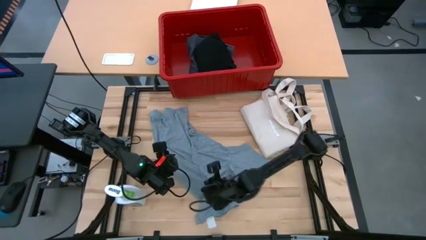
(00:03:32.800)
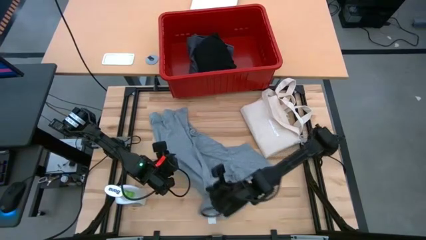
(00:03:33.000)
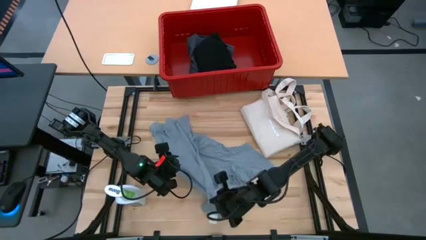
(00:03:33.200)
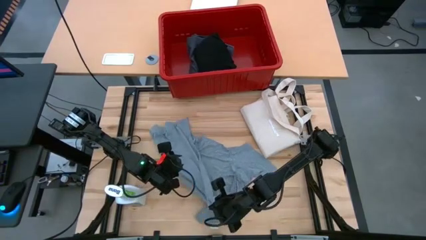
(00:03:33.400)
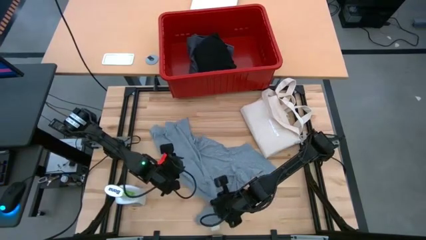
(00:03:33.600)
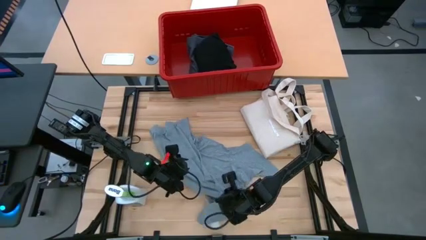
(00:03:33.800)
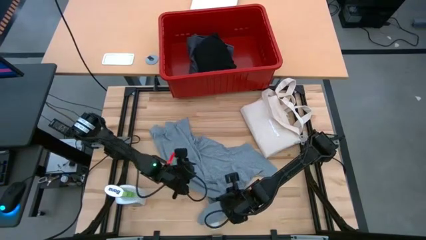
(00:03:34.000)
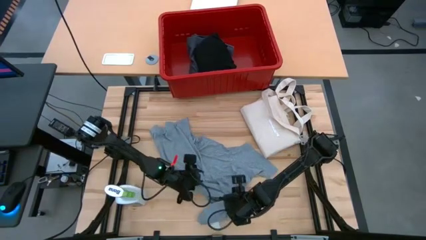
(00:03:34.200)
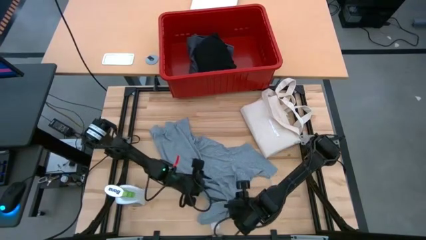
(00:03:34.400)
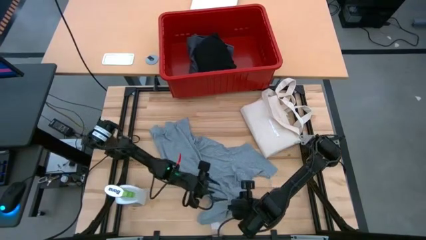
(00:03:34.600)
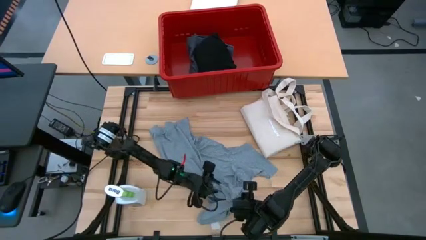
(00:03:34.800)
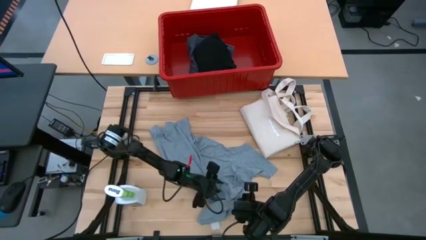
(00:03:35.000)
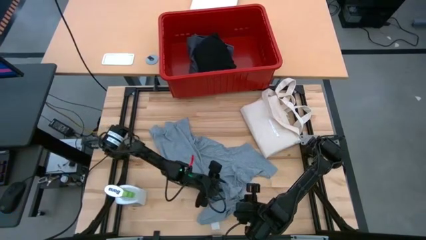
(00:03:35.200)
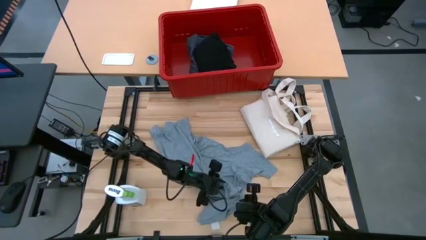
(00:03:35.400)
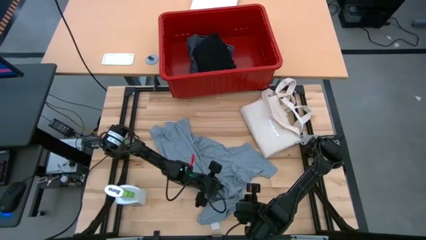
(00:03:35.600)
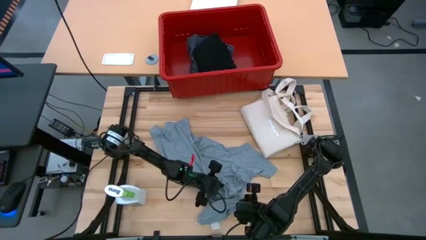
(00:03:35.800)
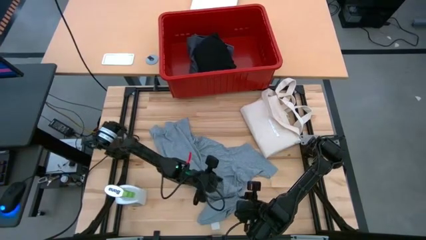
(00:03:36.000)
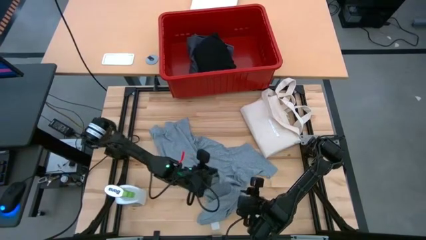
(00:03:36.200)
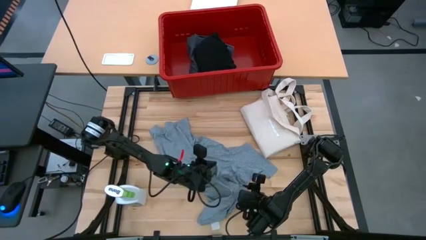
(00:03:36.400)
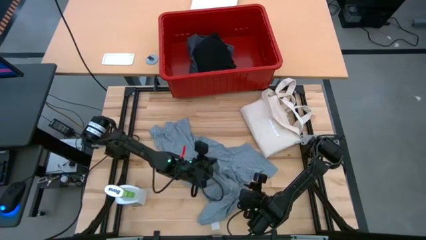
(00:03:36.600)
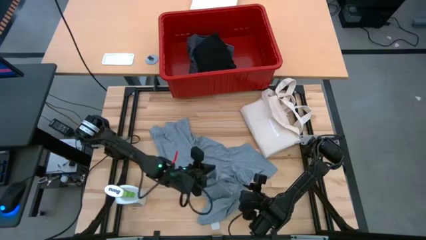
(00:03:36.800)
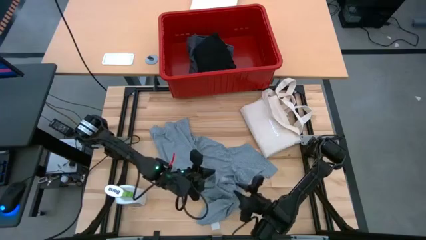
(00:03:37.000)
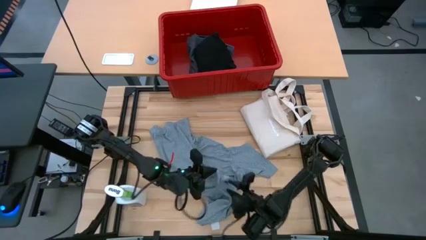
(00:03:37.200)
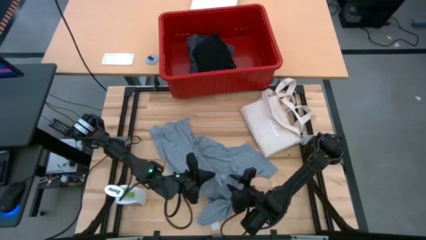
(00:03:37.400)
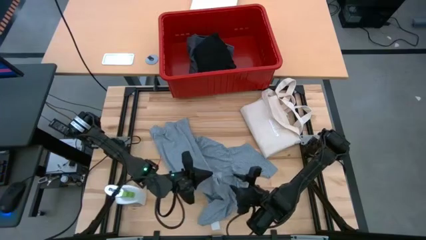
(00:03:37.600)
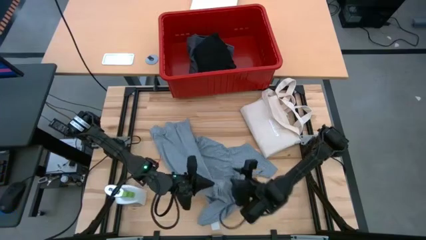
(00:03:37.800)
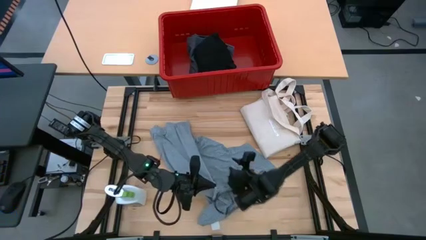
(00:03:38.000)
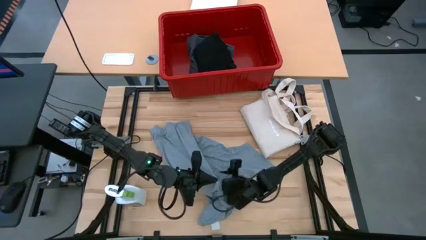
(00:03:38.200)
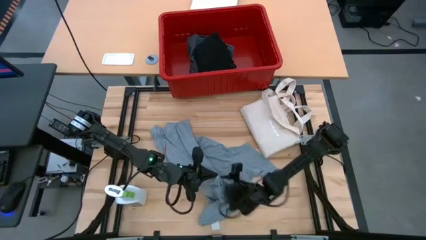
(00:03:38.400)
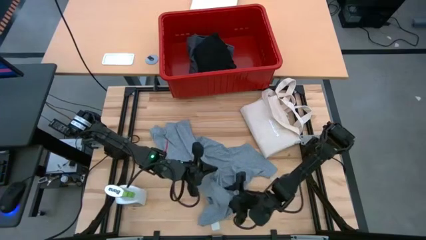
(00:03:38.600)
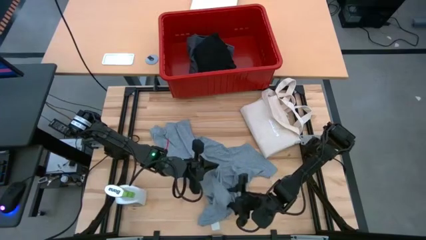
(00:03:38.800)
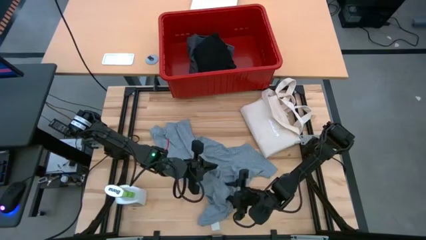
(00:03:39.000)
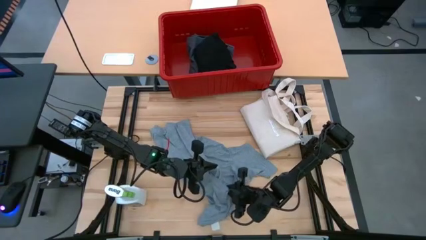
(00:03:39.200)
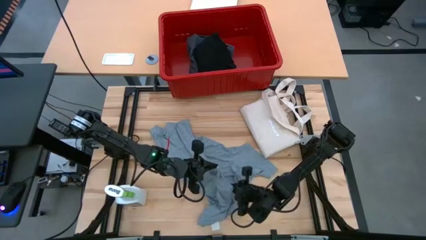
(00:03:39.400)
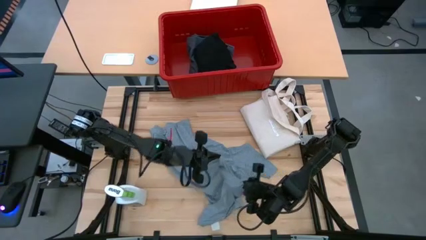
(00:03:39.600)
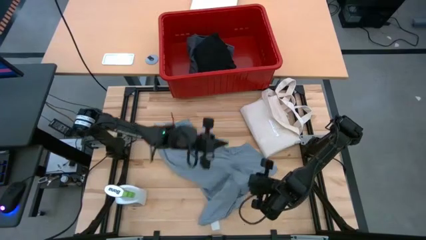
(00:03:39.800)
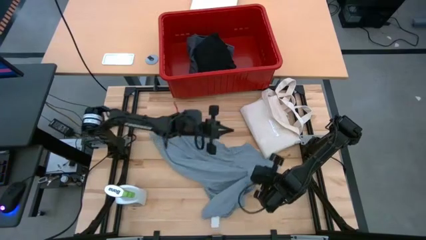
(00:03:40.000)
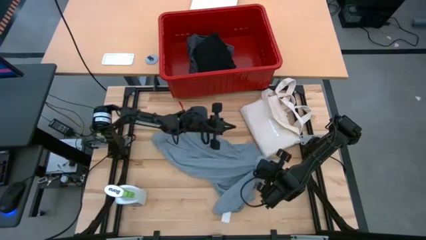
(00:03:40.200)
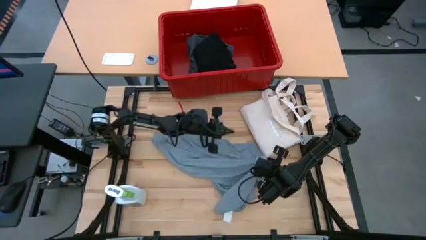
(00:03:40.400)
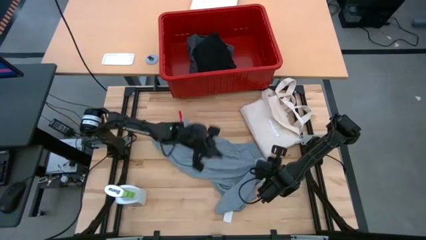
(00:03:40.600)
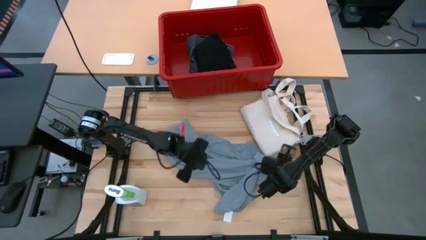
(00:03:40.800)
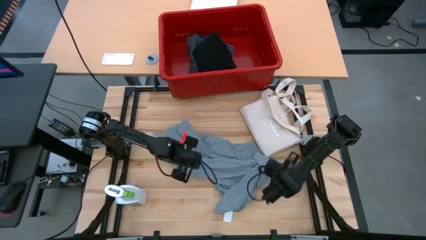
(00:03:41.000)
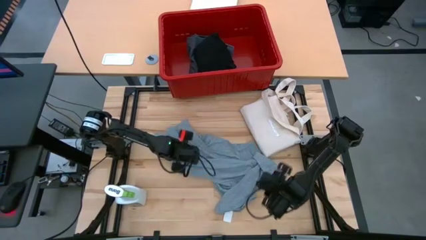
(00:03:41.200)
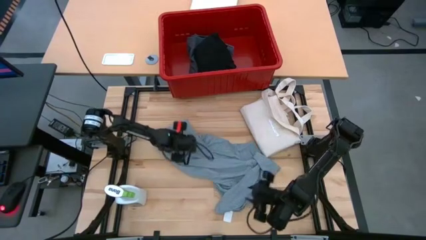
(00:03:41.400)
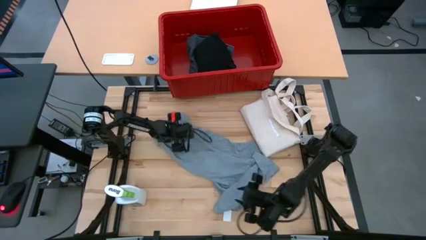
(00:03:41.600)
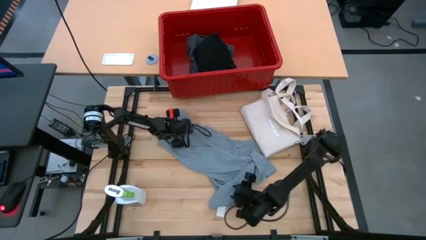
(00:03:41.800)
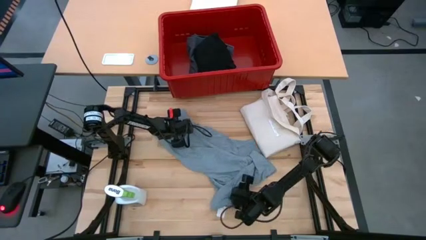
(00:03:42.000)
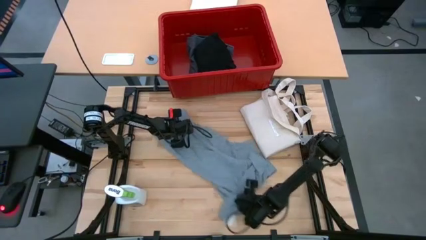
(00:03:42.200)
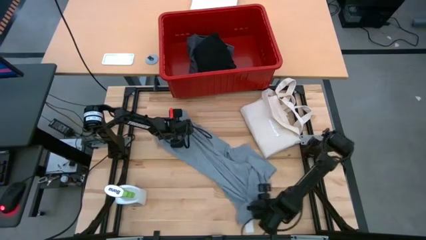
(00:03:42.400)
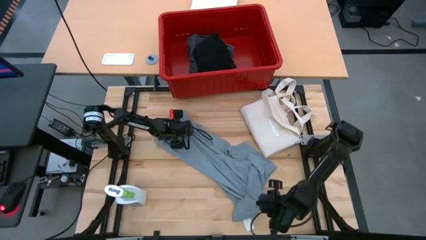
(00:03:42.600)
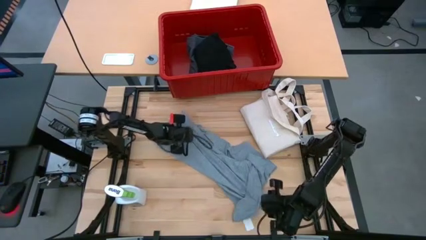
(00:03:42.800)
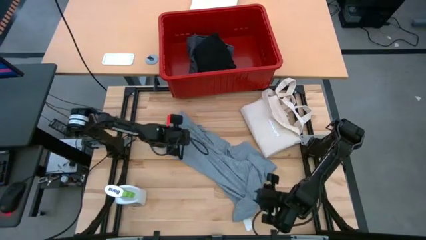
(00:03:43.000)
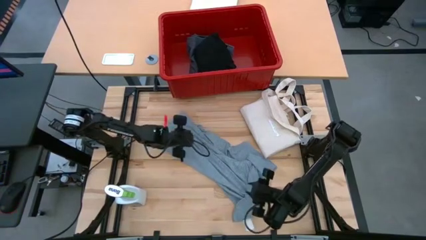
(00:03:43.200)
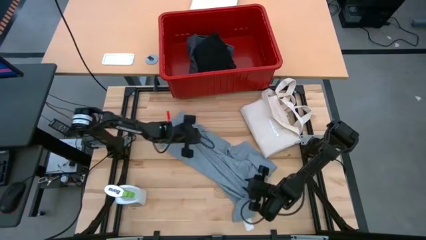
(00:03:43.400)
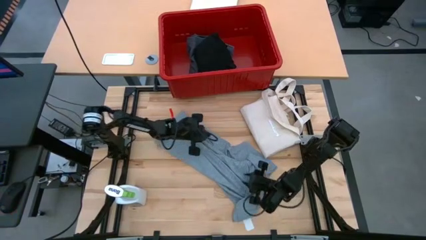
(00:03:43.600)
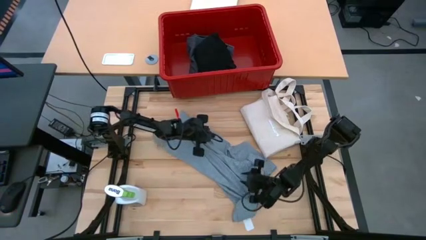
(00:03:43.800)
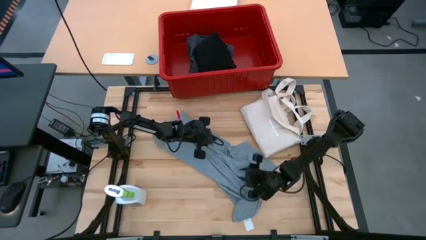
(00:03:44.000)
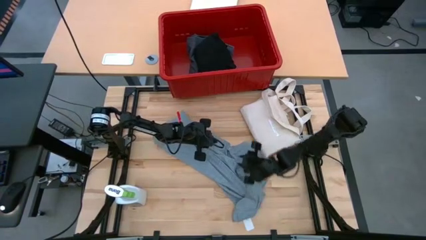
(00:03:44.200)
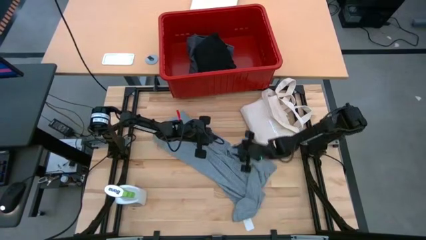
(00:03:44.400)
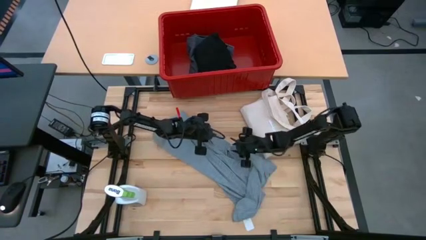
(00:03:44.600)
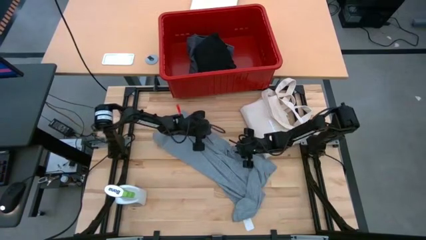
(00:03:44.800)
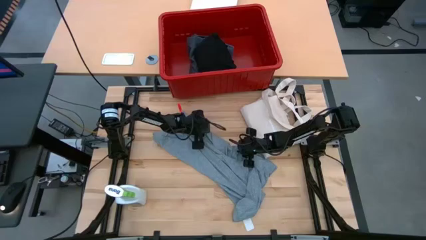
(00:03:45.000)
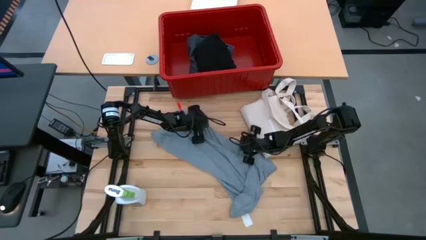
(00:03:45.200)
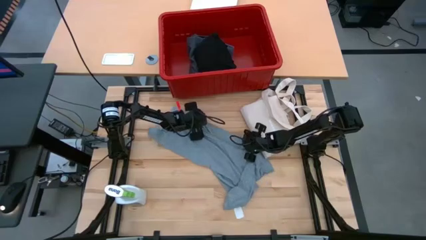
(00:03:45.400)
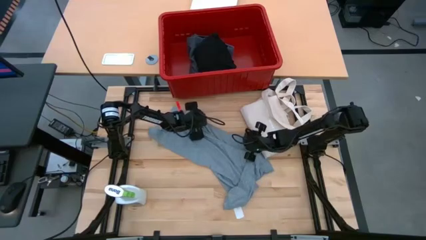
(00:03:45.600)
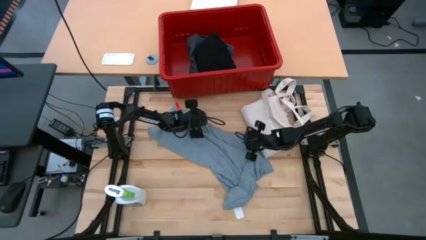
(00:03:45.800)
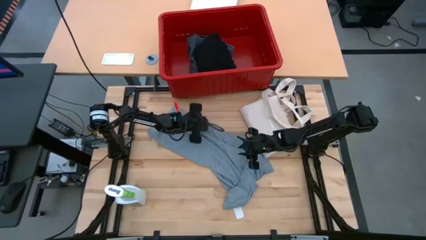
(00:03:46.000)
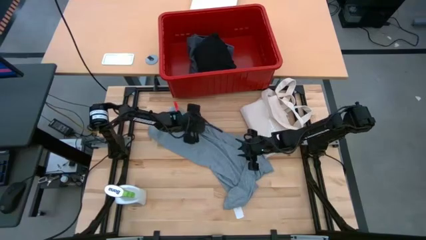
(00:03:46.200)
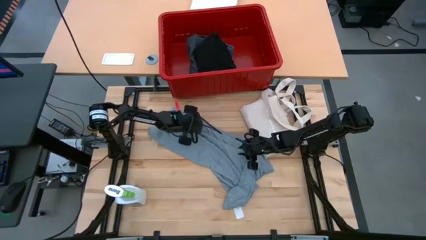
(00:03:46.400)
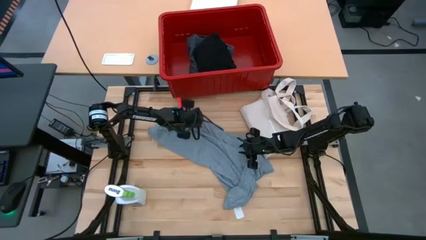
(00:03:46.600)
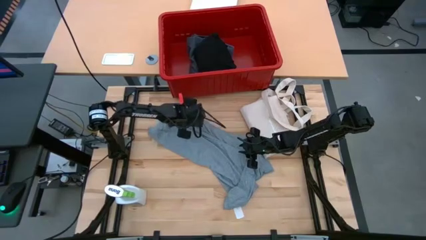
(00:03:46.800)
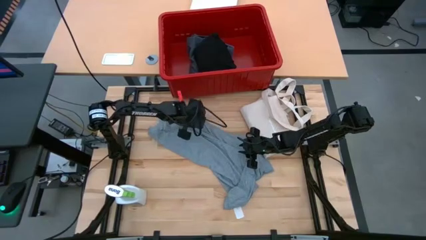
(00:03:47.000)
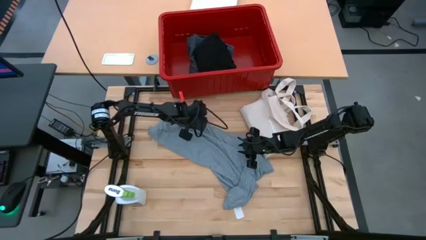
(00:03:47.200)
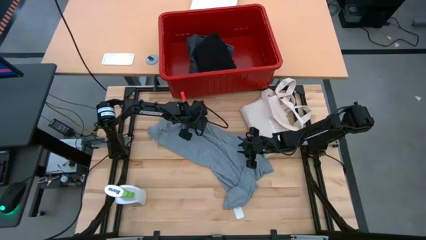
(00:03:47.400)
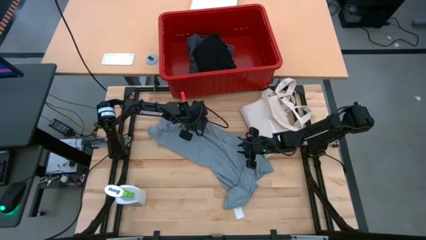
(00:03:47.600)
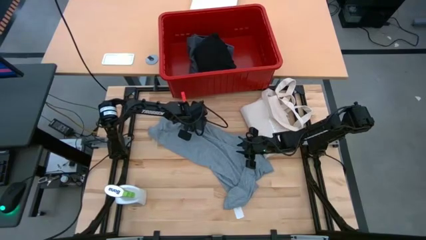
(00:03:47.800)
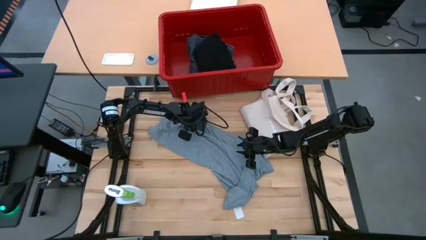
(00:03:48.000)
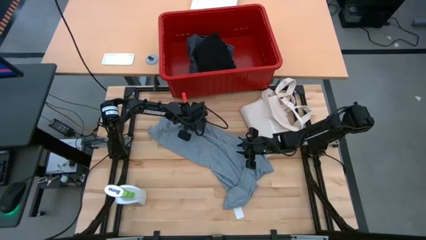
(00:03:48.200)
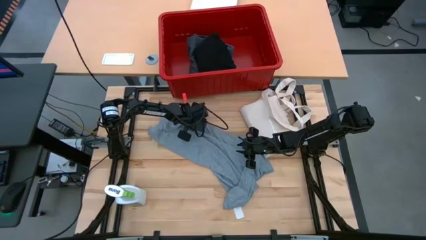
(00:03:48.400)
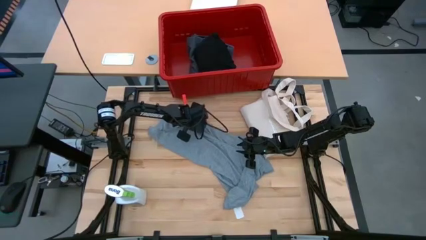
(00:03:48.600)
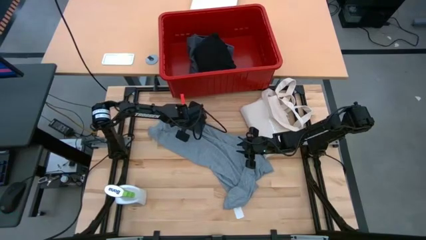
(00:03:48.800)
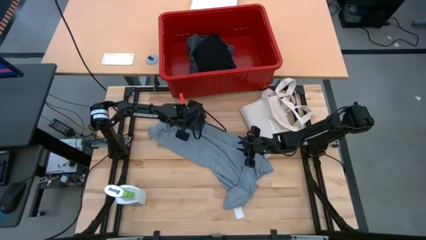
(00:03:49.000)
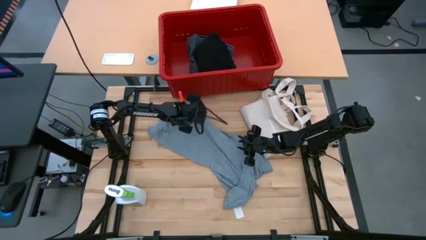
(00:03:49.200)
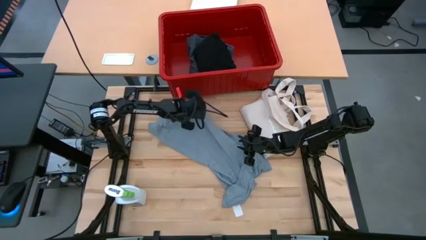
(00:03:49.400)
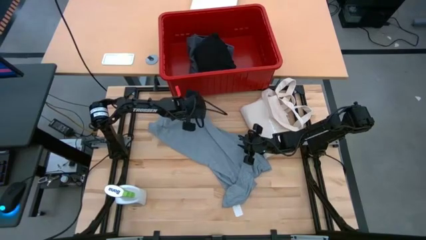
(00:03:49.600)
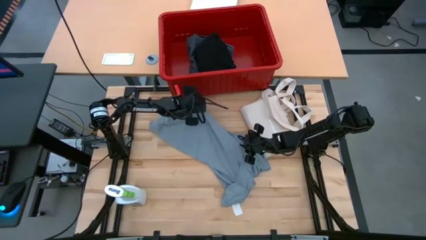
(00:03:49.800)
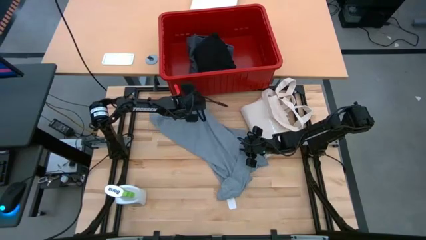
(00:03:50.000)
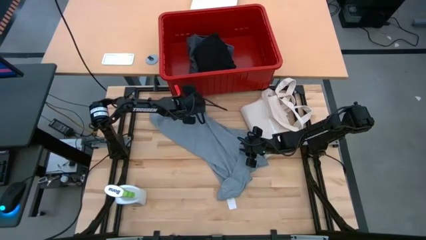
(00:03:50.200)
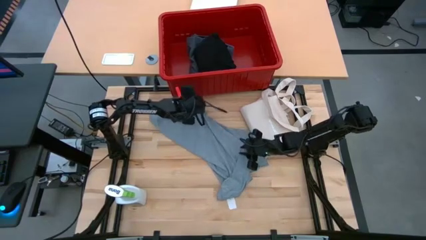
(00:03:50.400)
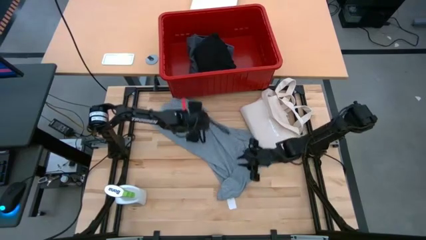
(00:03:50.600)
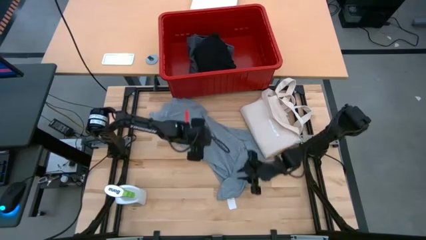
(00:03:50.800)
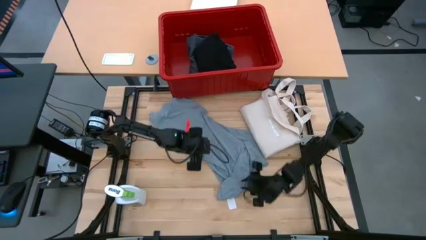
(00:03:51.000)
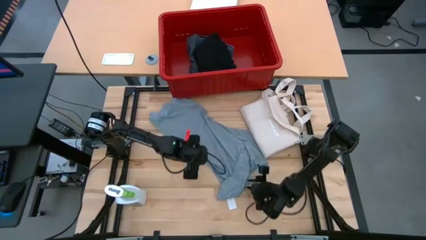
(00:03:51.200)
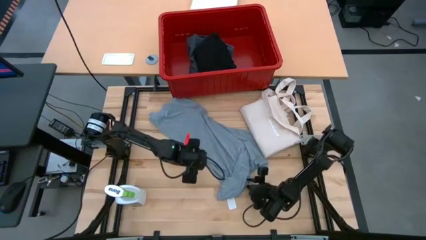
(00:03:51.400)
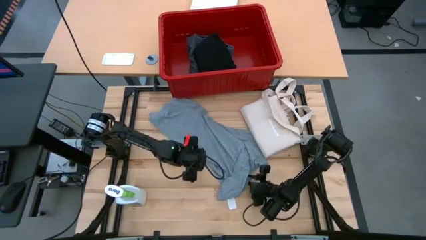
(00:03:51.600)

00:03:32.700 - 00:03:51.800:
Task: Fold Laundry from Bin
Fold the gray shirt
